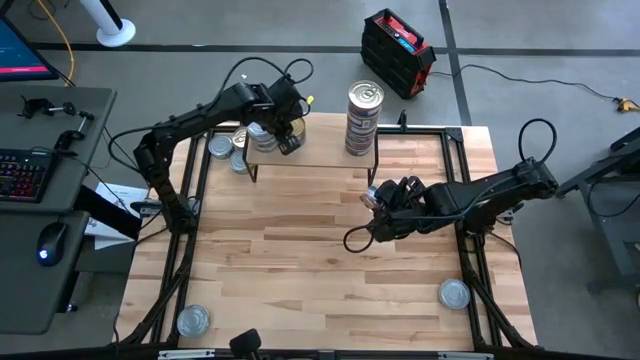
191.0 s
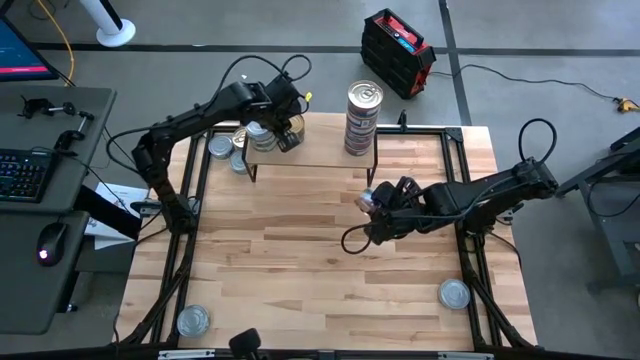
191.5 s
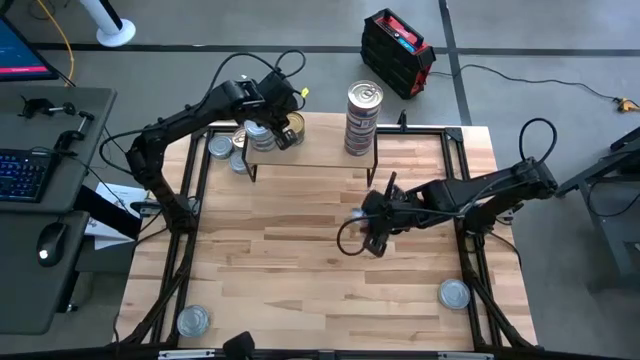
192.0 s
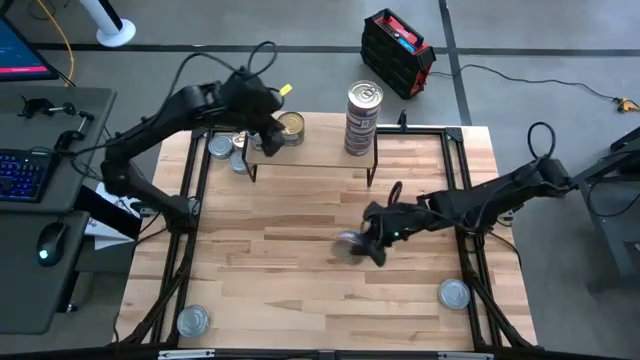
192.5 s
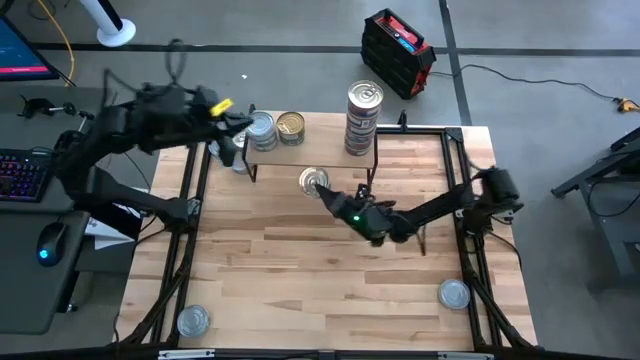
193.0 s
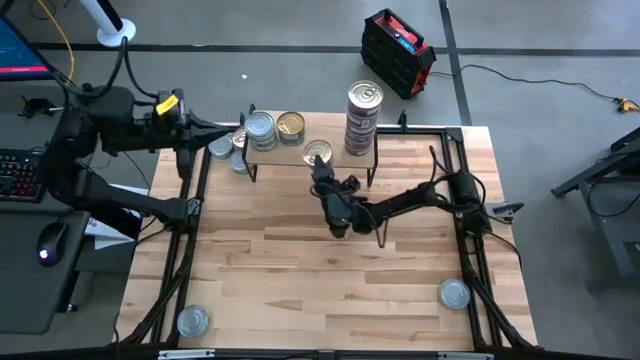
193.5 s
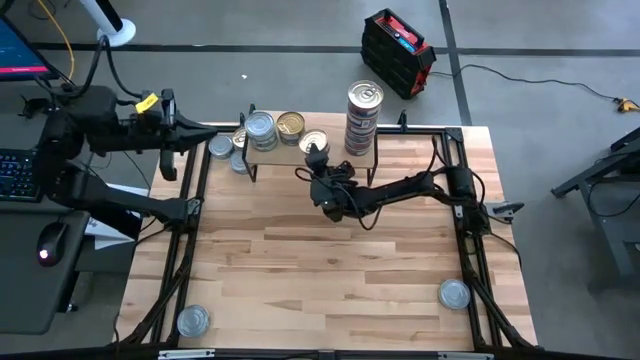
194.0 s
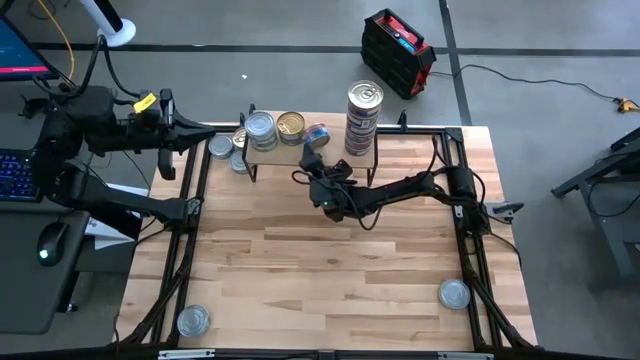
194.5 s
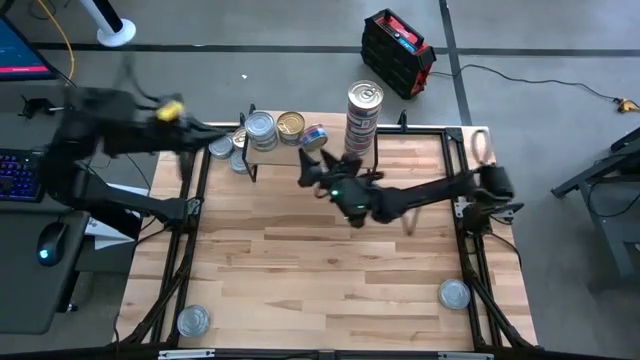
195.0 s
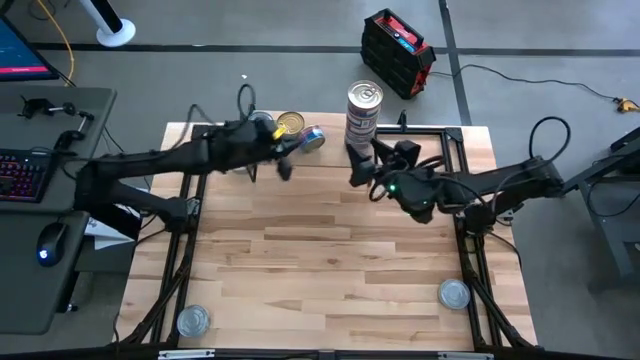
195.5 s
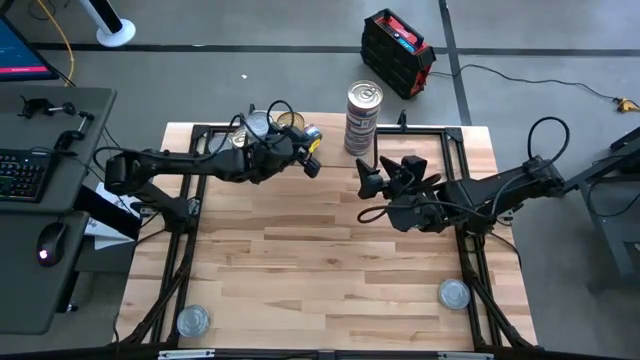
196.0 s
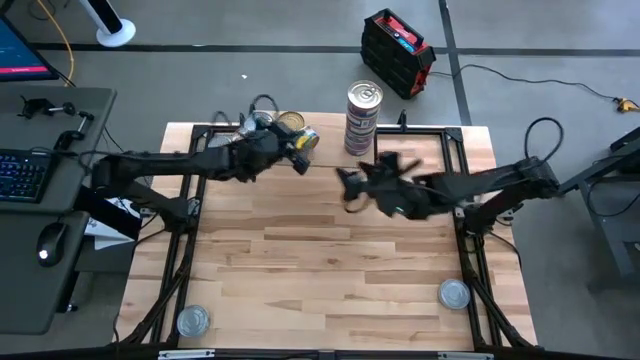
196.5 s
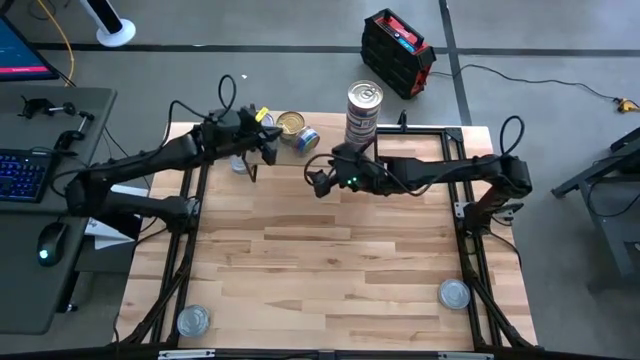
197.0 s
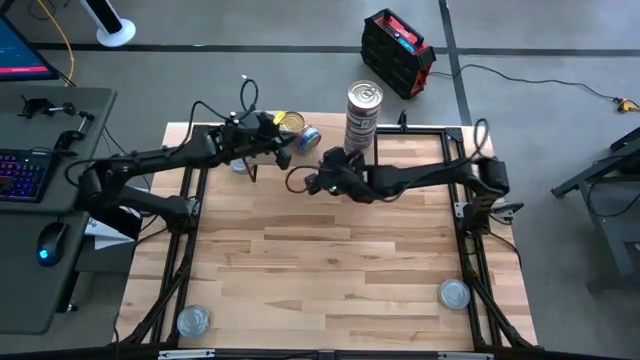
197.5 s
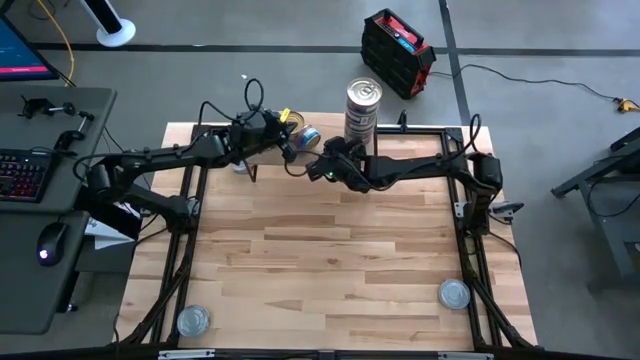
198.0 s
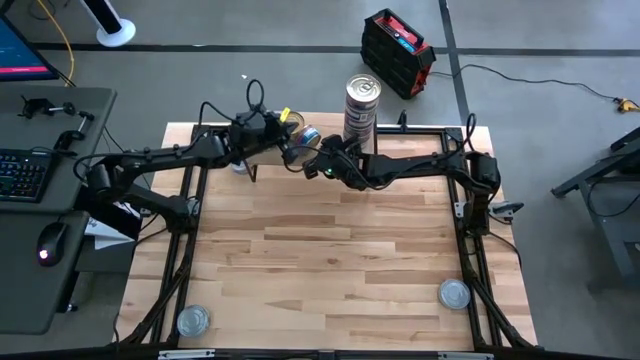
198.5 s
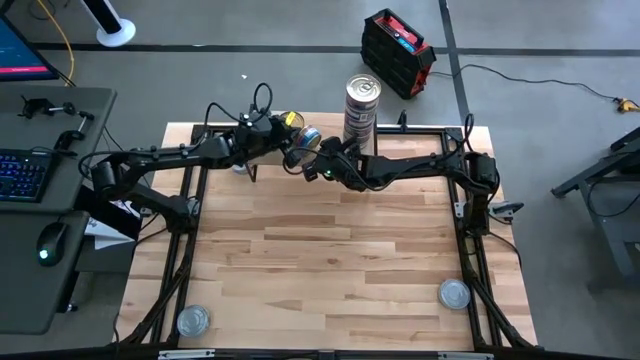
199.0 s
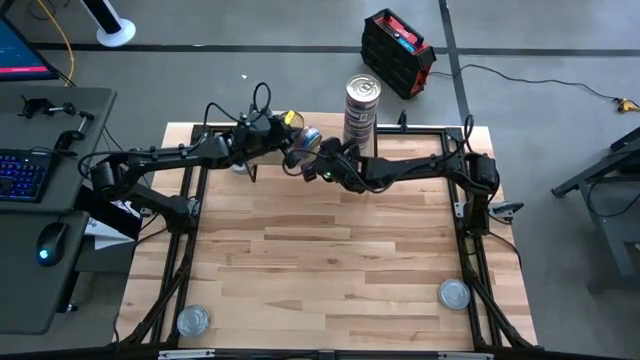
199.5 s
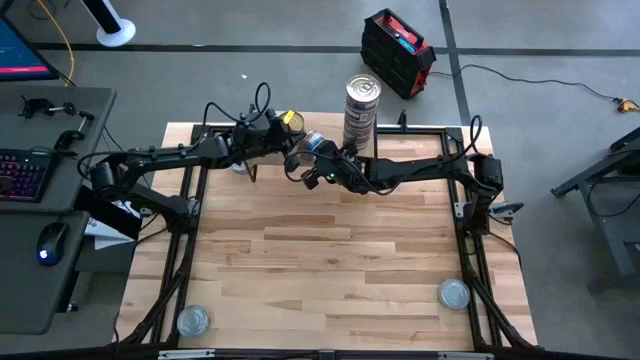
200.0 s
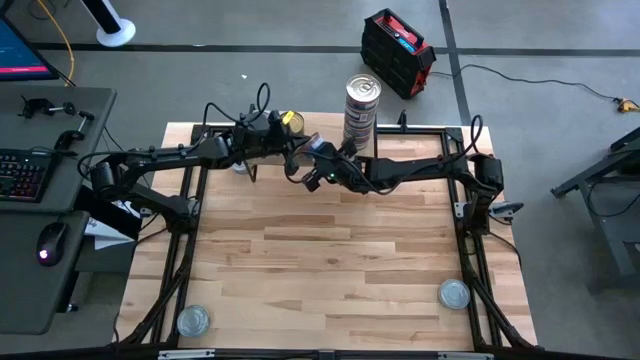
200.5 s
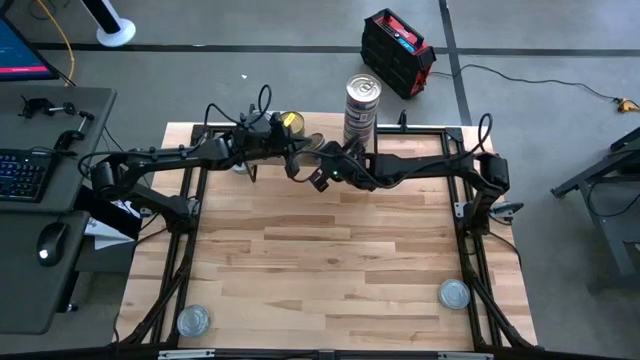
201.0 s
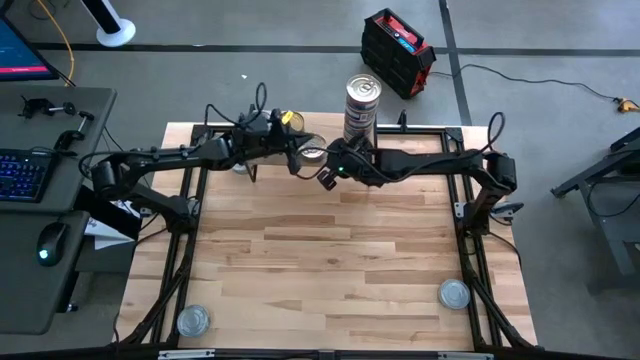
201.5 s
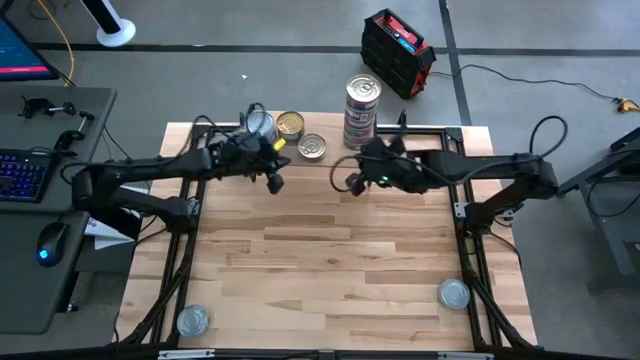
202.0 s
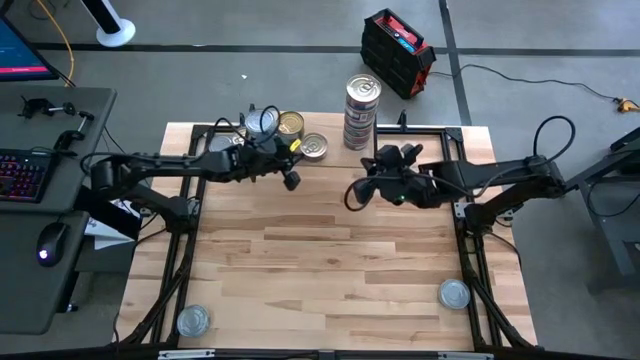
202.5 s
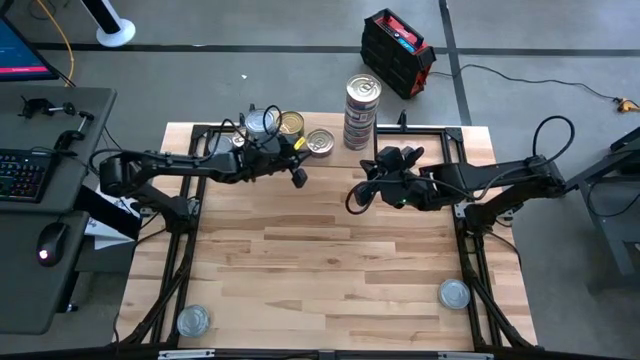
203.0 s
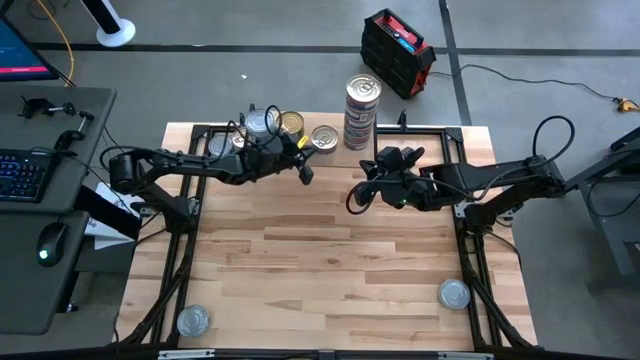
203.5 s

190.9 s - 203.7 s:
Task: Stack canned seafood by type on shelf
Put the blue pink tuna can on the shelf

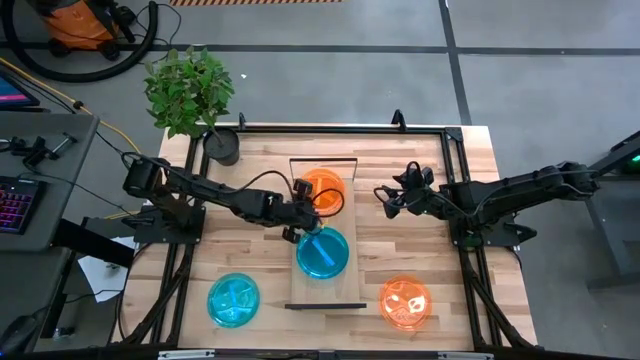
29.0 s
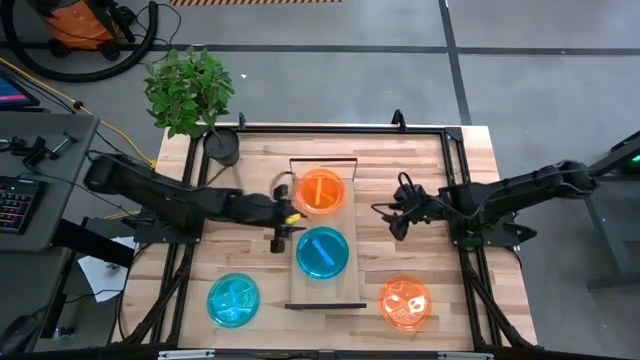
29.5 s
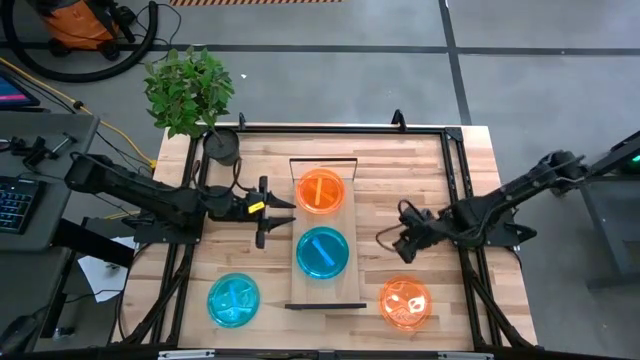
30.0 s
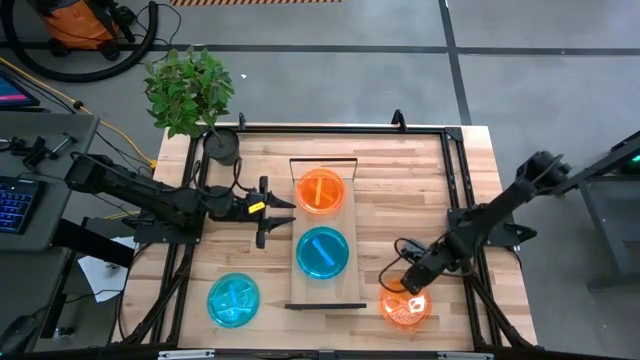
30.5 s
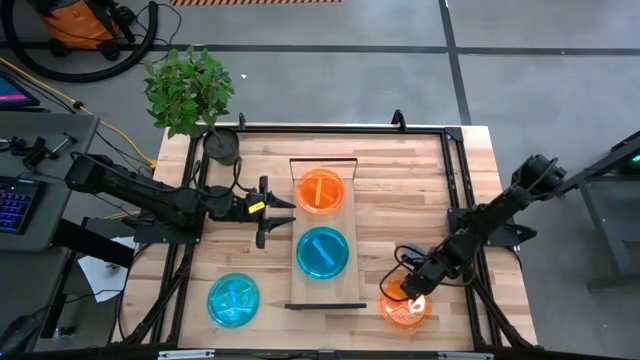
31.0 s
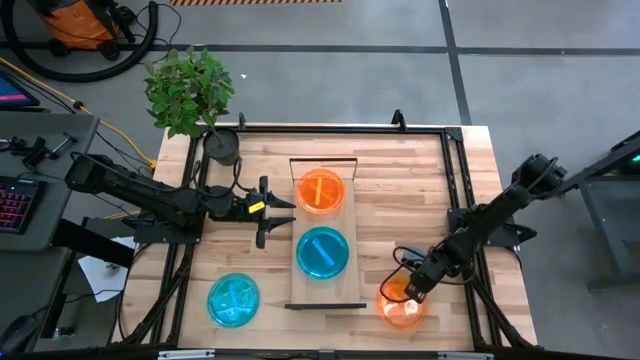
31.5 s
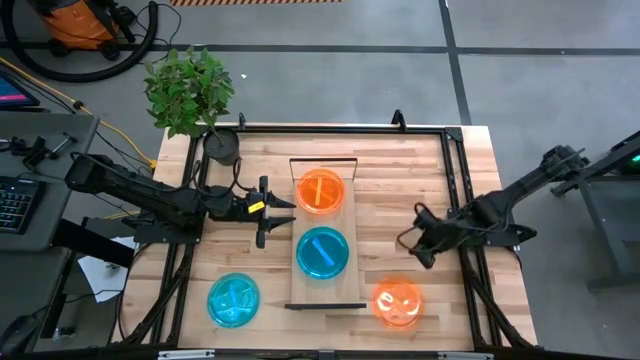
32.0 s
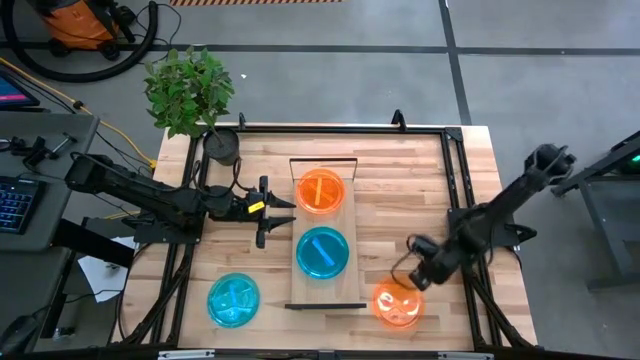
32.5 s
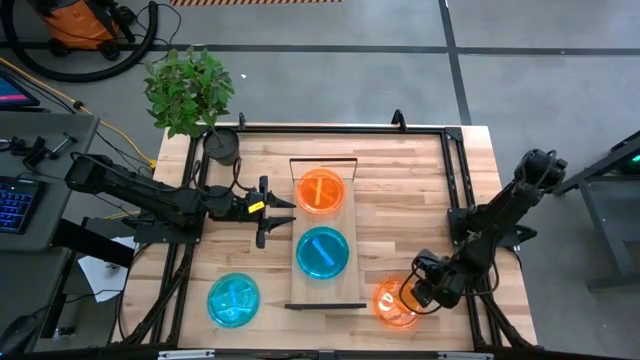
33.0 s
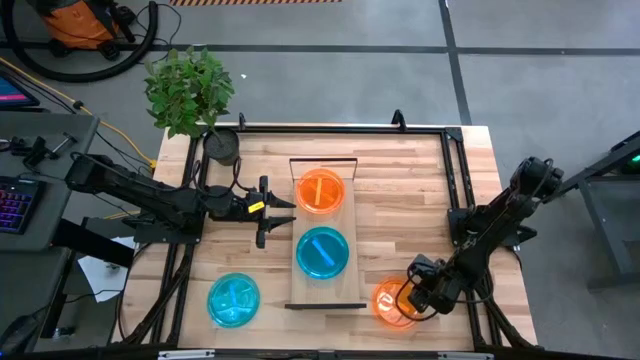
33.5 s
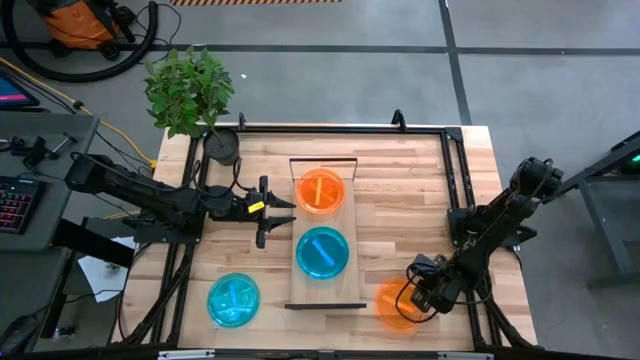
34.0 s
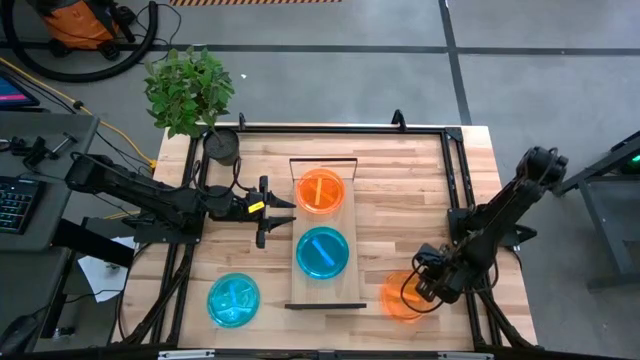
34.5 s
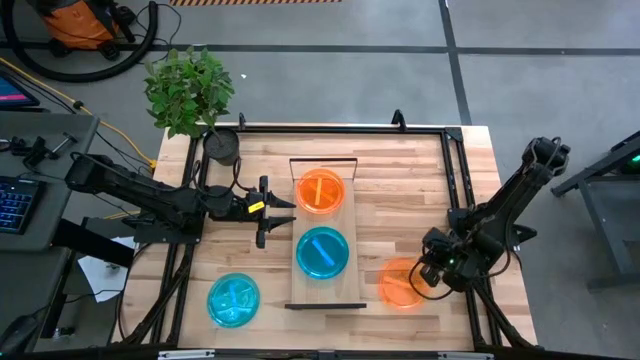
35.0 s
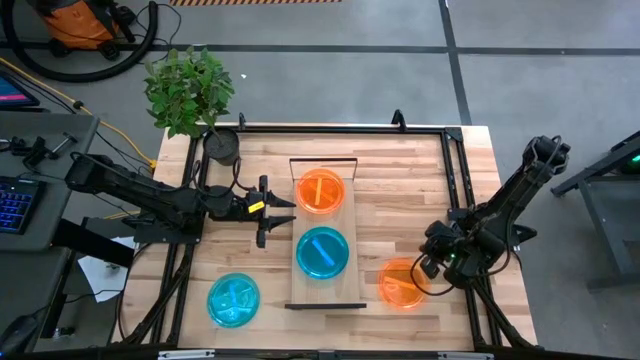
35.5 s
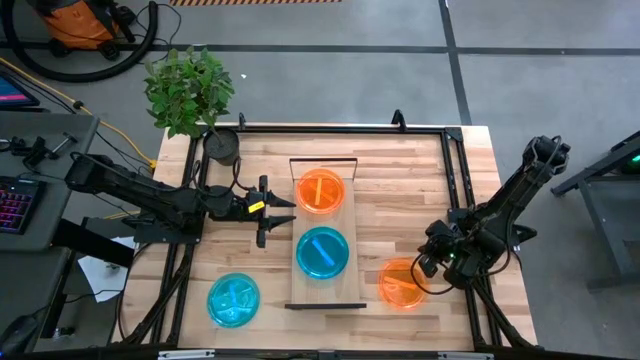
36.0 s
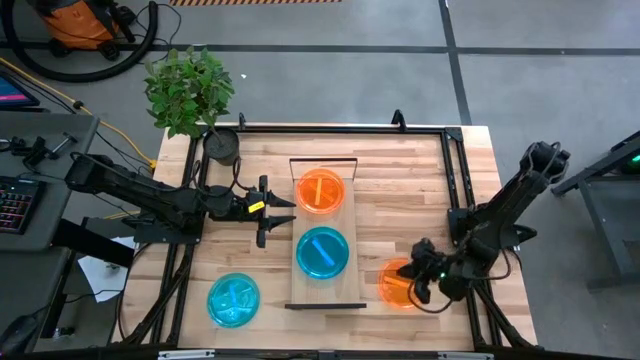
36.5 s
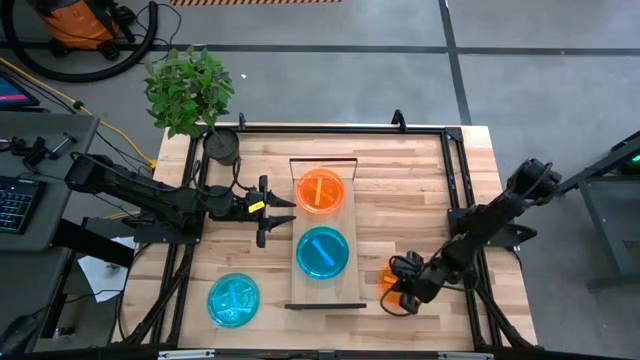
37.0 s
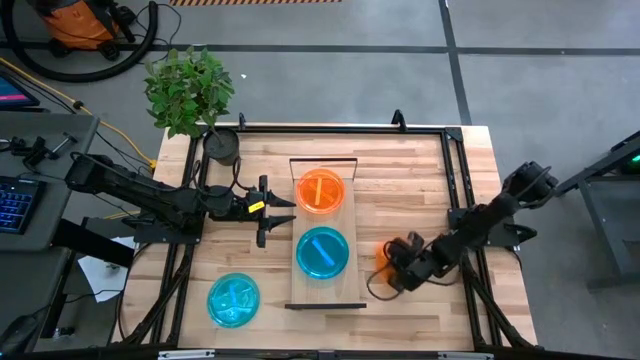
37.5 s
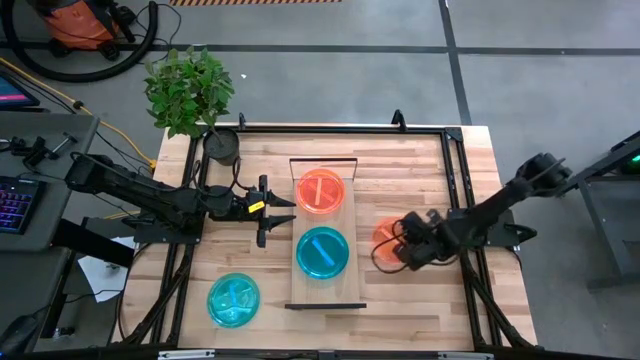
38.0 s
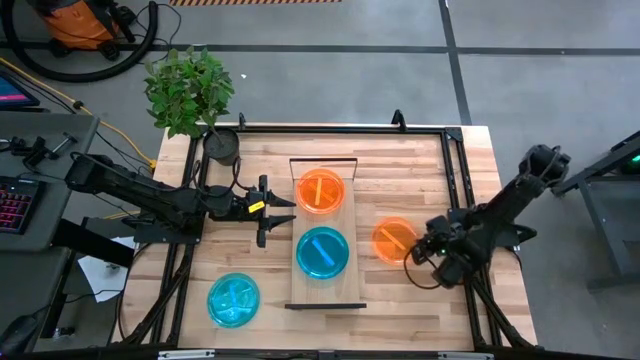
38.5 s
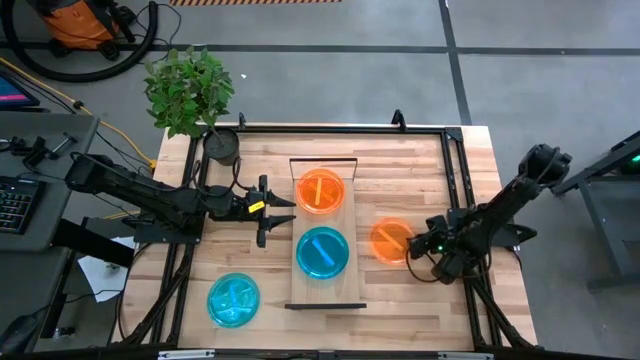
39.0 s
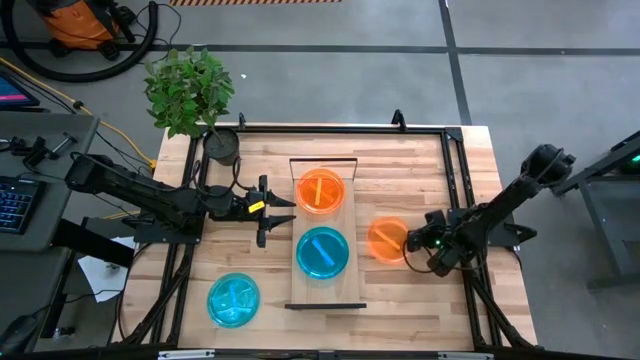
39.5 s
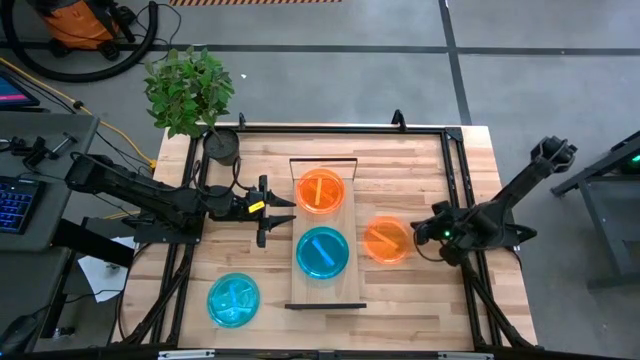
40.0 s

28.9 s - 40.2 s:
Task: Place and stack plates onto a shelf
Stack the orange plate on top of the orange plate on the shelf
